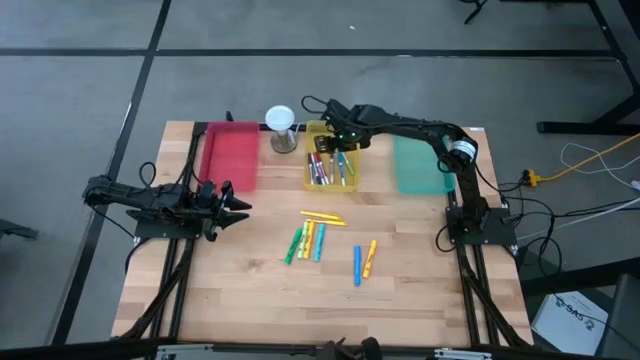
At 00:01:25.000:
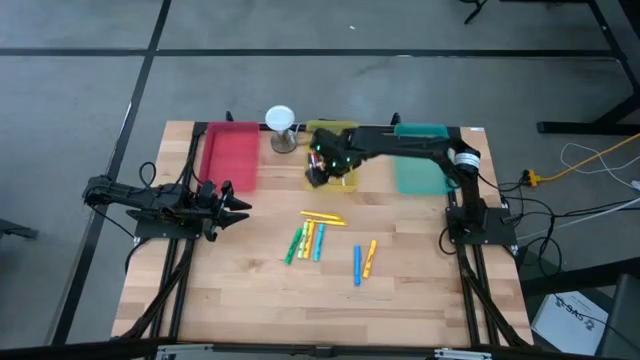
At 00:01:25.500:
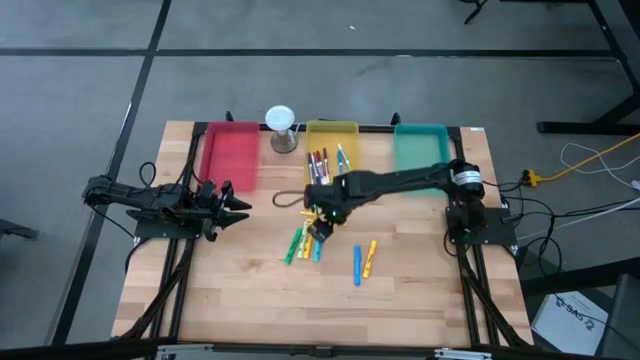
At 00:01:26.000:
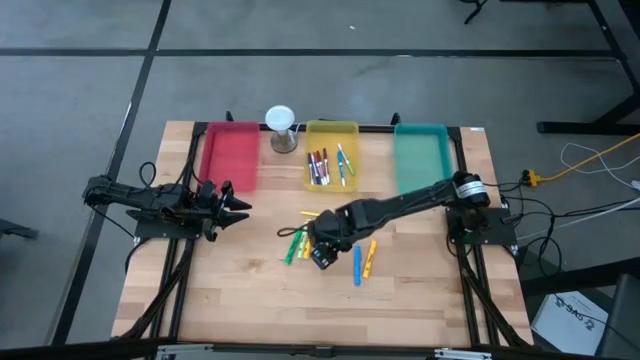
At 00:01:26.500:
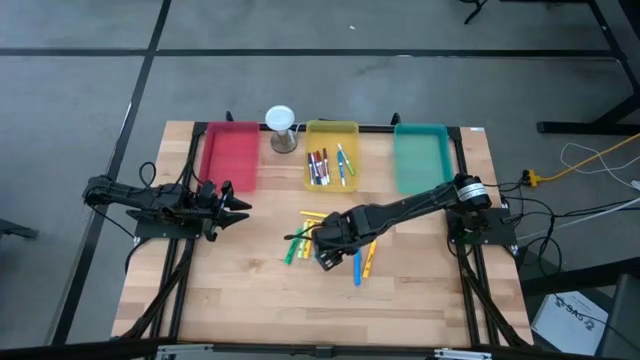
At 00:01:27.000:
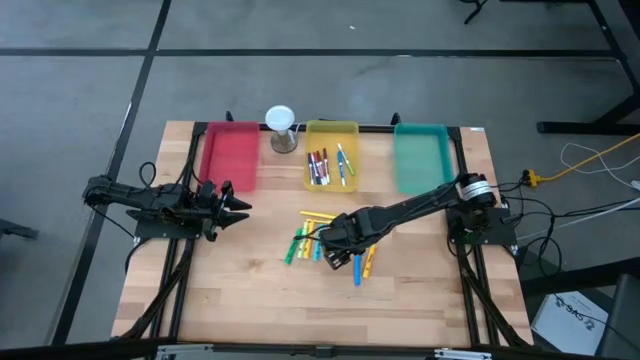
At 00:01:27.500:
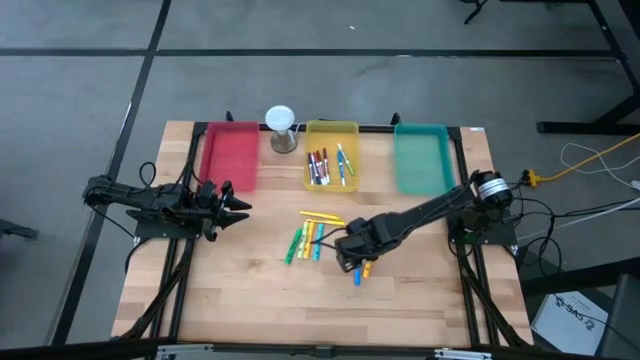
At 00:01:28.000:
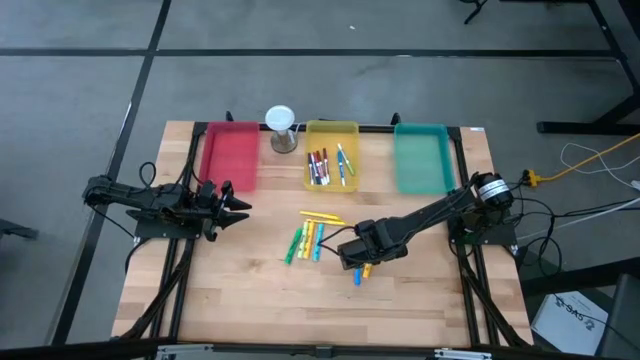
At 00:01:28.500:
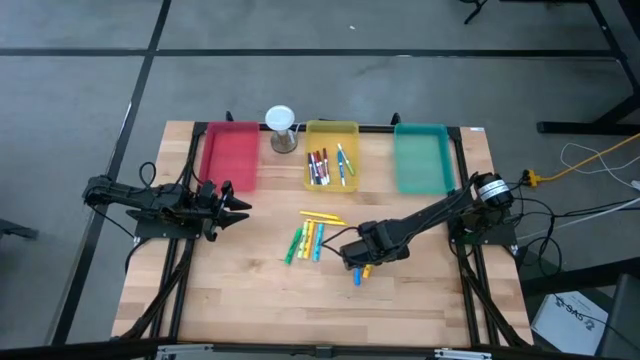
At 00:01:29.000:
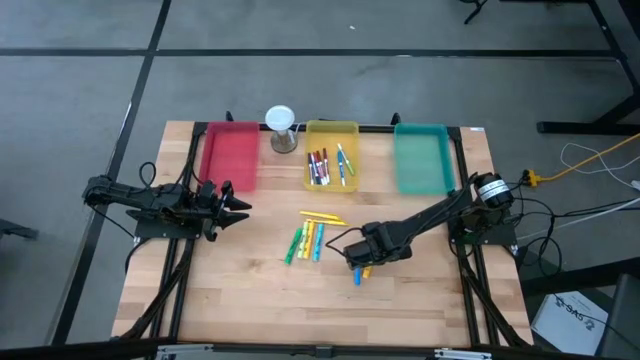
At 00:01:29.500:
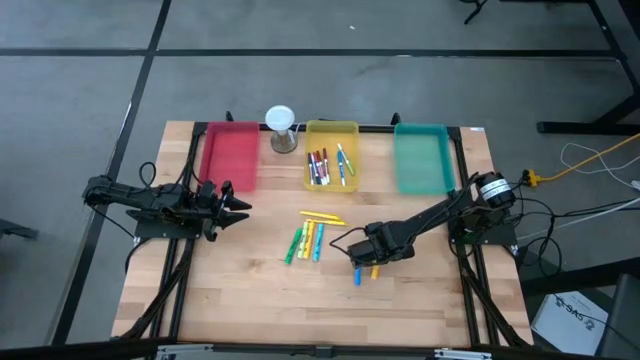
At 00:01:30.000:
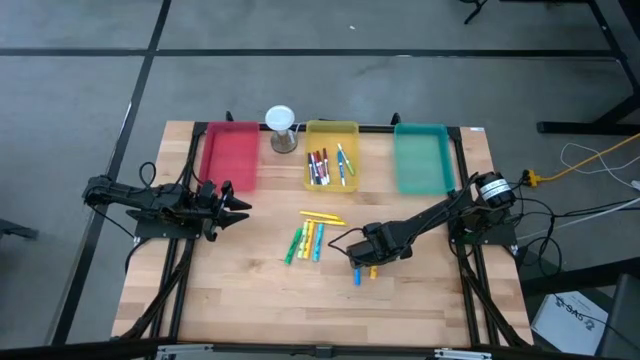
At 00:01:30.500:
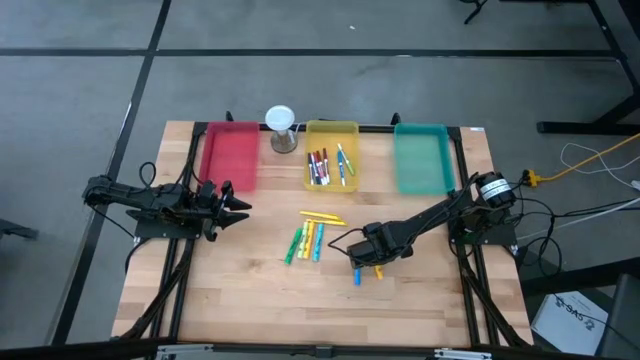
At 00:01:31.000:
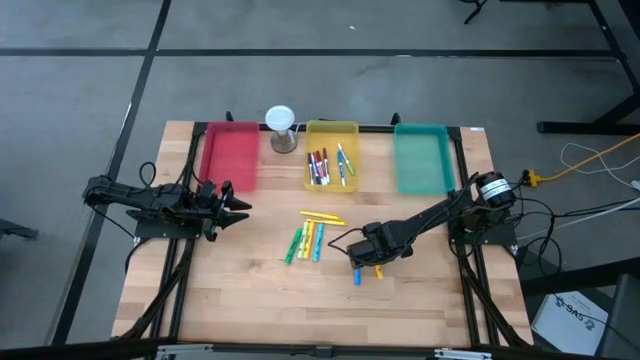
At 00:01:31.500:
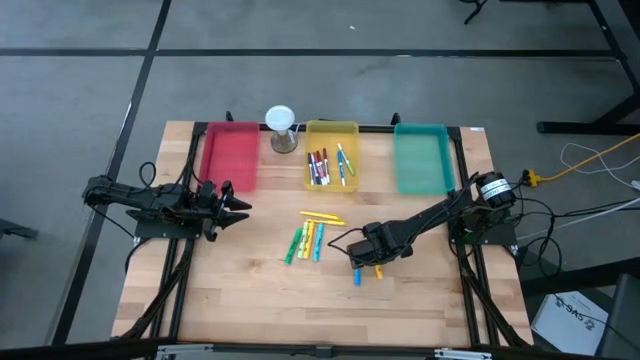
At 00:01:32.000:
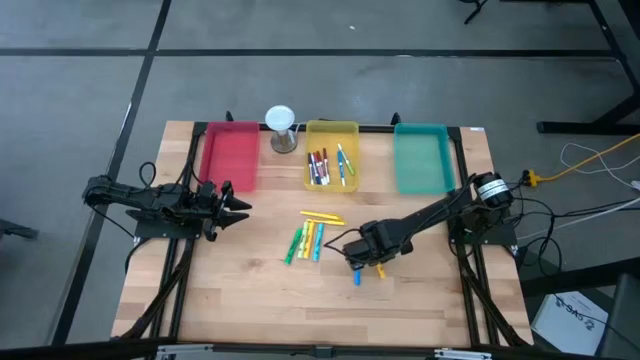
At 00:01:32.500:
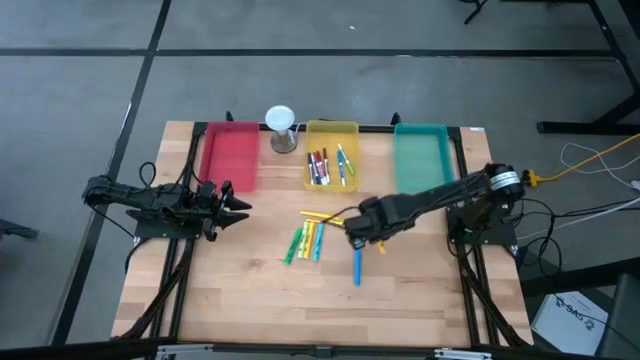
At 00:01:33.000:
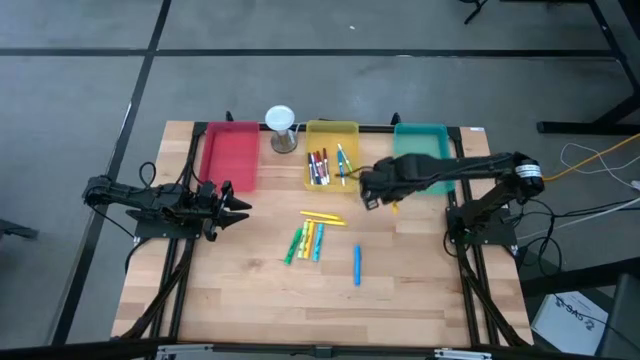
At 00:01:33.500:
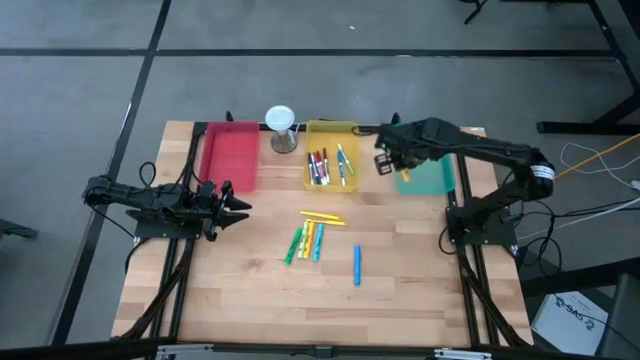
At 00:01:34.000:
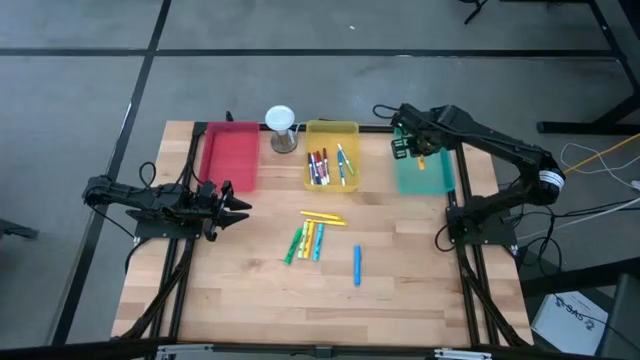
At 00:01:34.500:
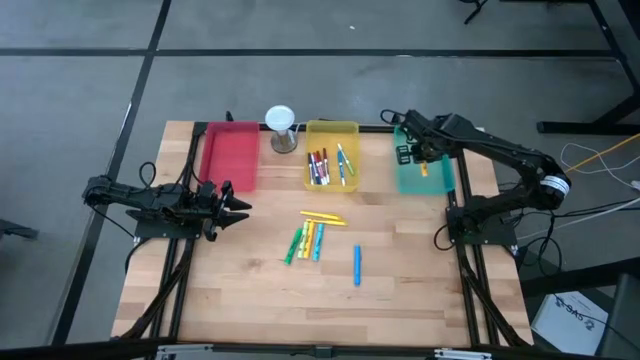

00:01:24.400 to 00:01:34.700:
Task: Pick & Place Markers
Put the right yellow highlighter into the blue bin

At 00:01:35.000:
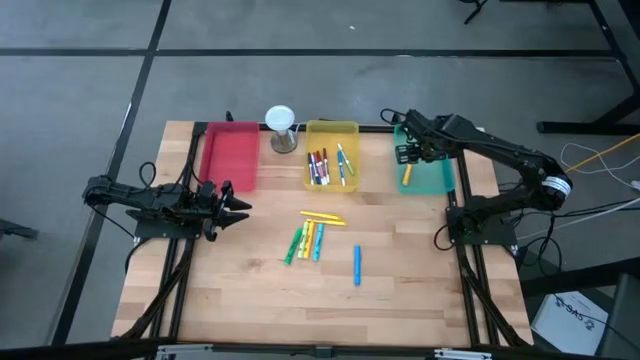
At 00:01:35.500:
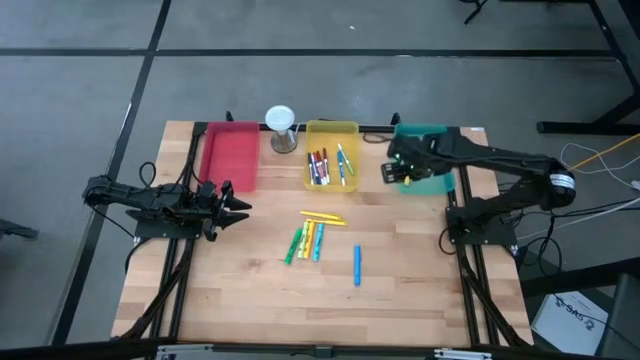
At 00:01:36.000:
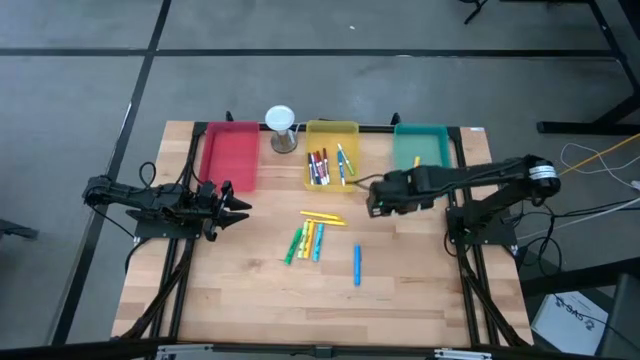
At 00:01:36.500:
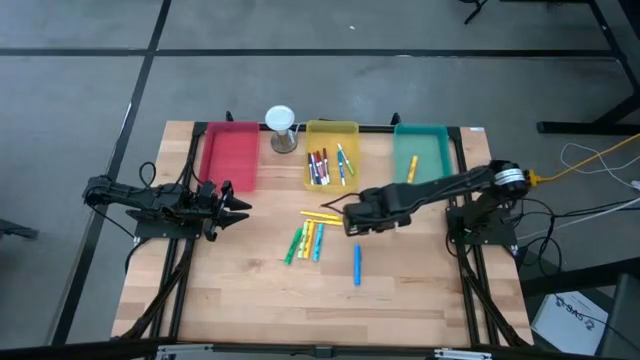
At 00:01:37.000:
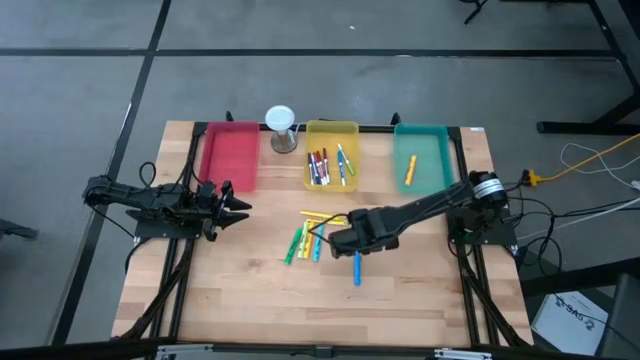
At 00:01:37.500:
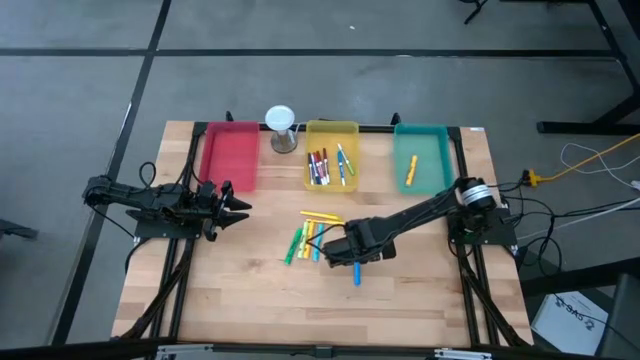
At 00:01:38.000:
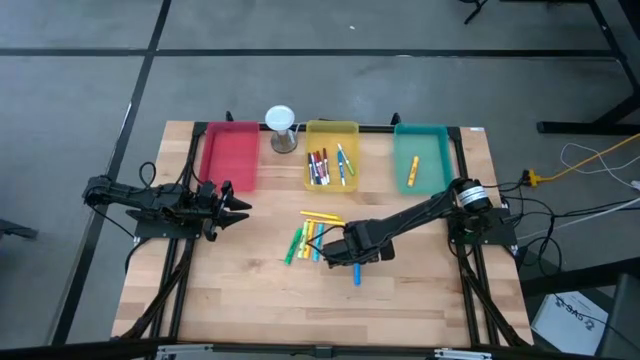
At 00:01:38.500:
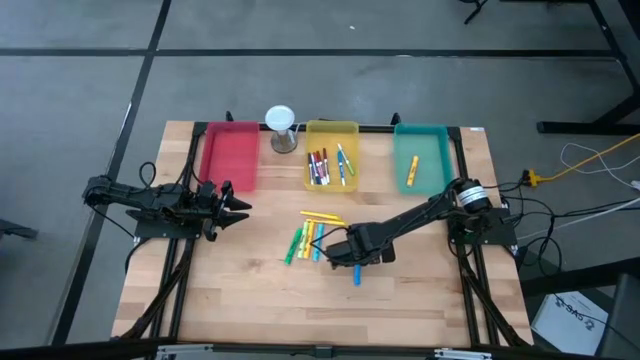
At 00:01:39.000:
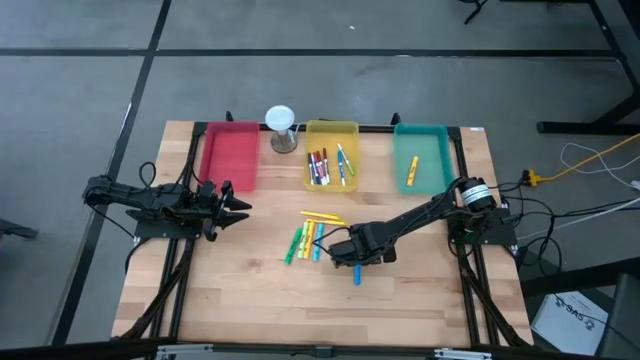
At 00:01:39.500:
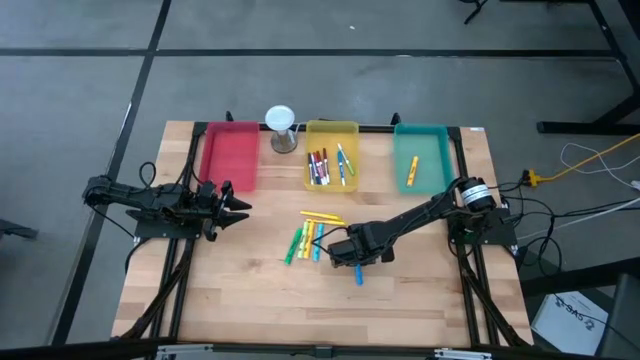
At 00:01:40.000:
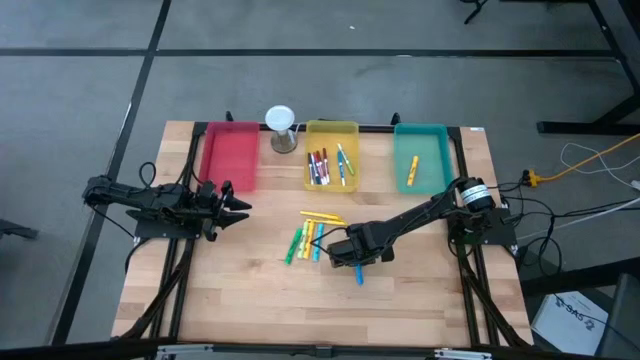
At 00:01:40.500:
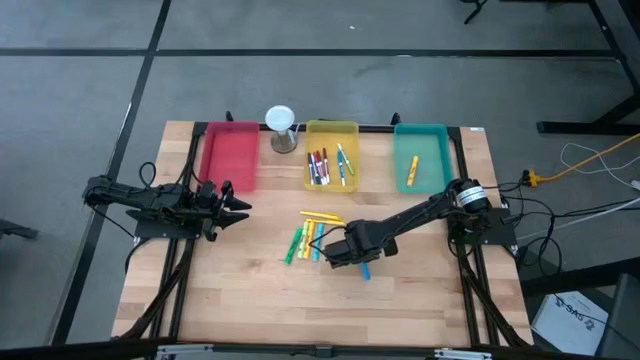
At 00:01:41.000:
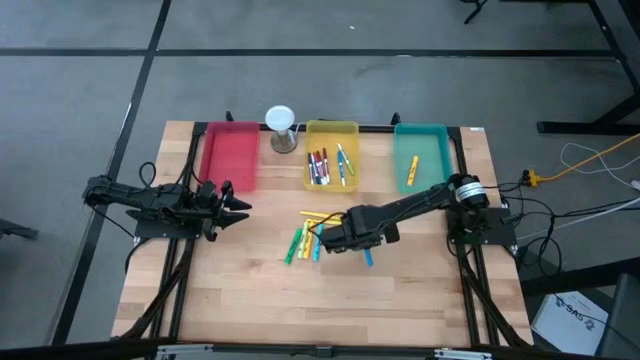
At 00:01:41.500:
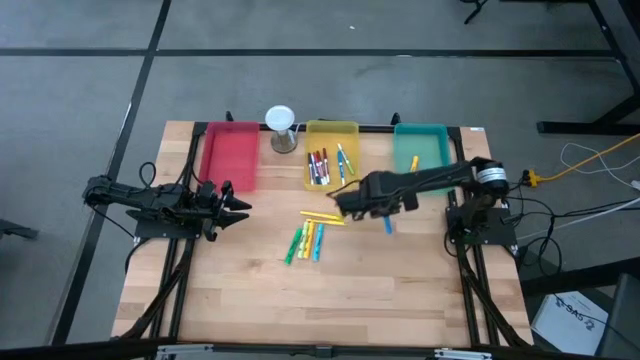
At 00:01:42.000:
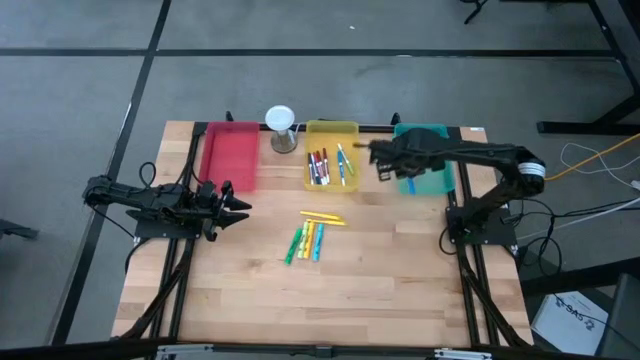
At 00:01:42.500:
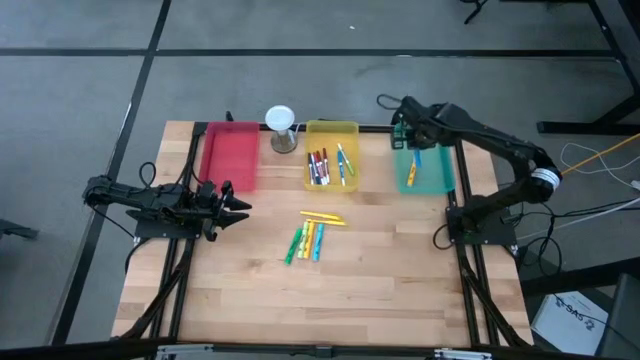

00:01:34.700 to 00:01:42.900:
Put the blue highlighter into the blue bin
